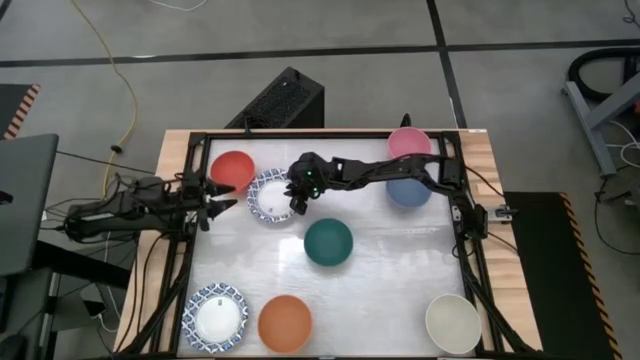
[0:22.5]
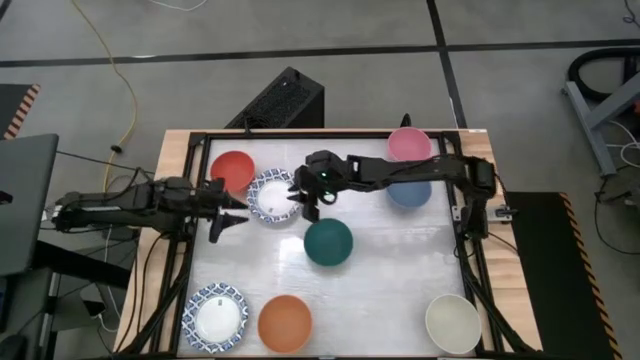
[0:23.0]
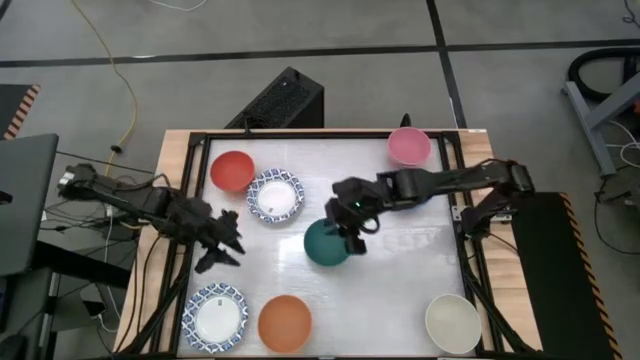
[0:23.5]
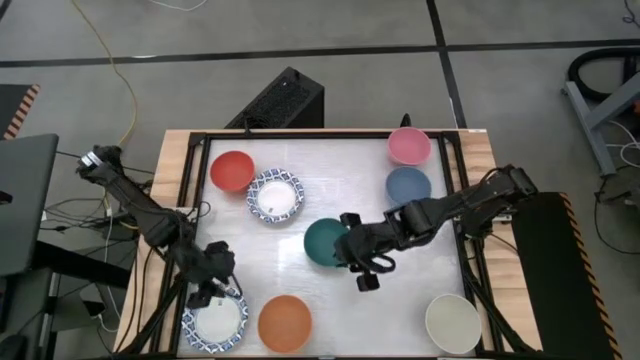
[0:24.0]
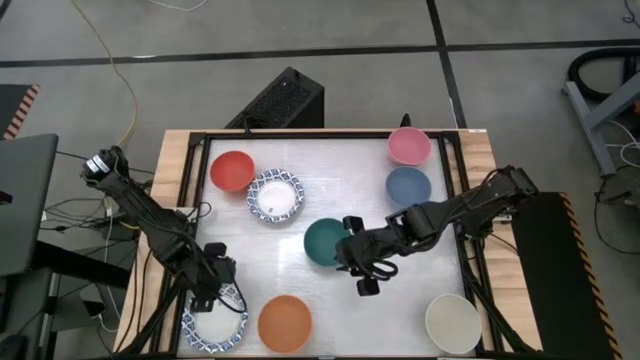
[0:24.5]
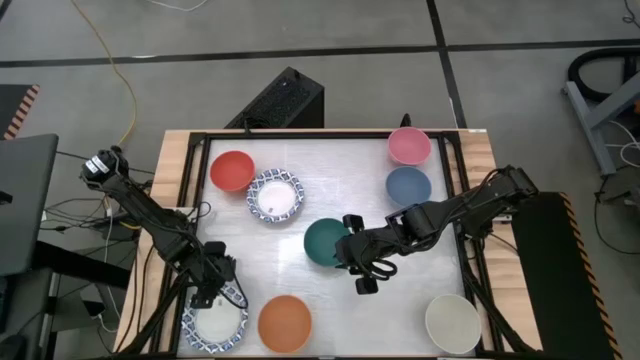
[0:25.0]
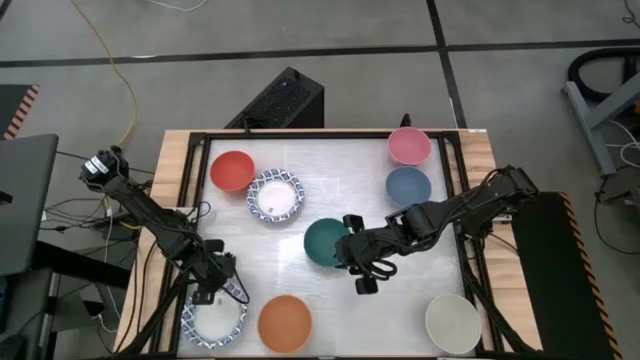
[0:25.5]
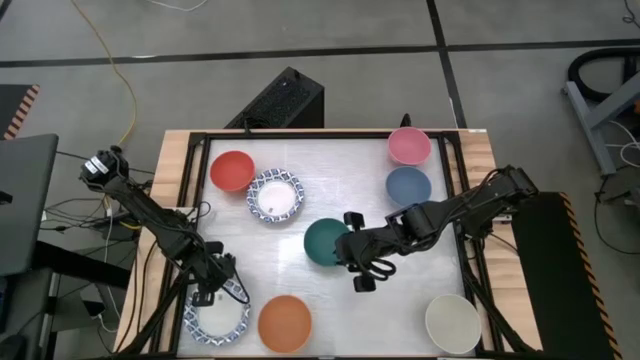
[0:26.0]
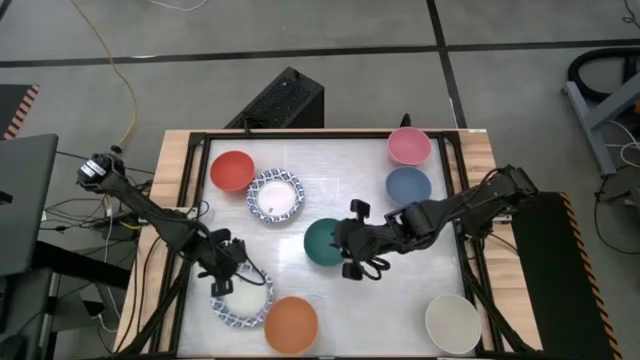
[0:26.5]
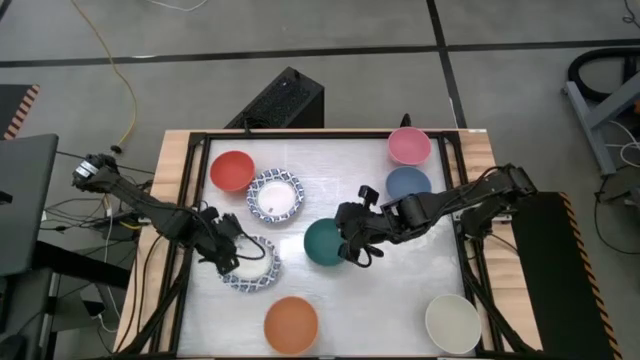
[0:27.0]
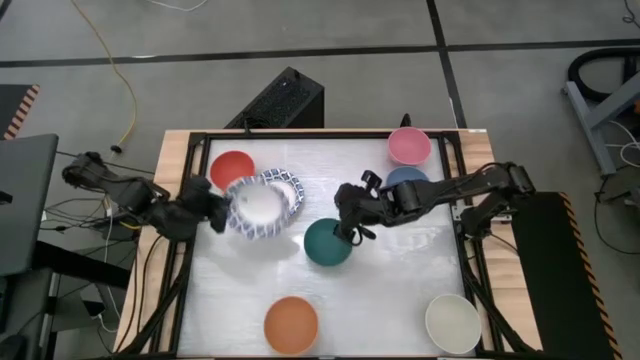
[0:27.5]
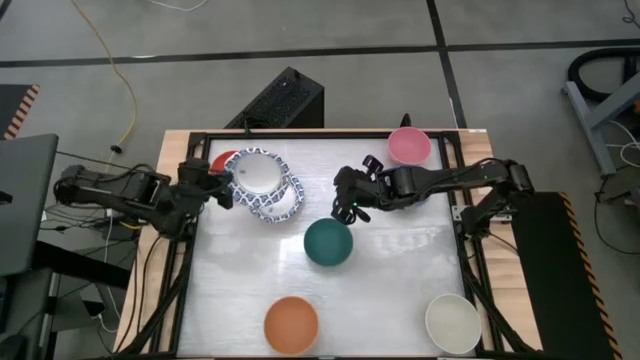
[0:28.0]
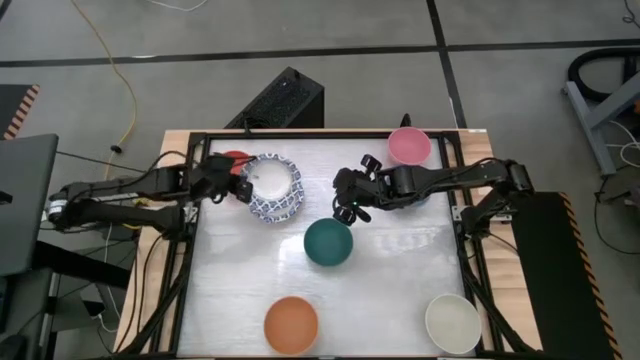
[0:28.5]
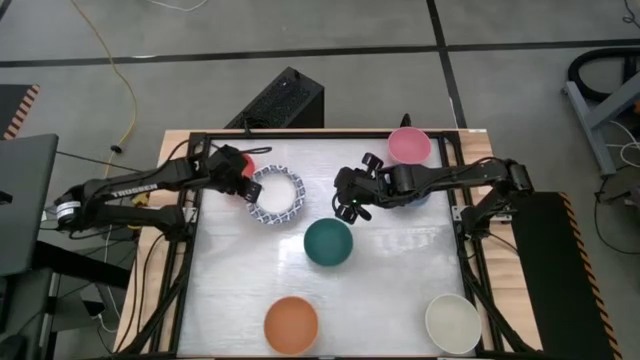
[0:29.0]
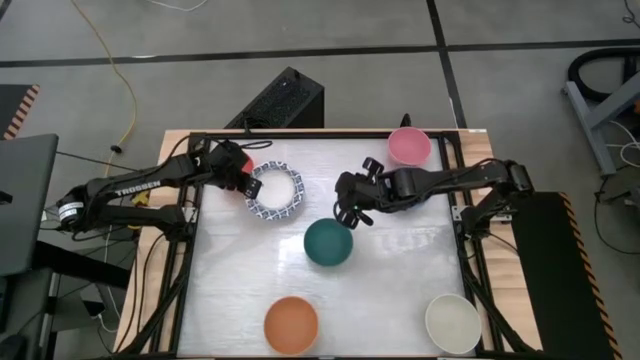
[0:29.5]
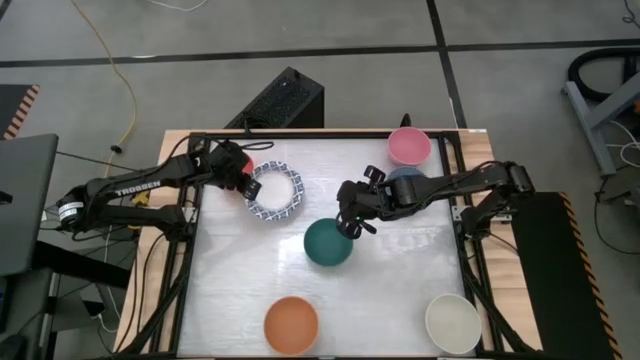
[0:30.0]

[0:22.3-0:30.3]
Stack the bottom blue patterned bowl on top of the other white bowl

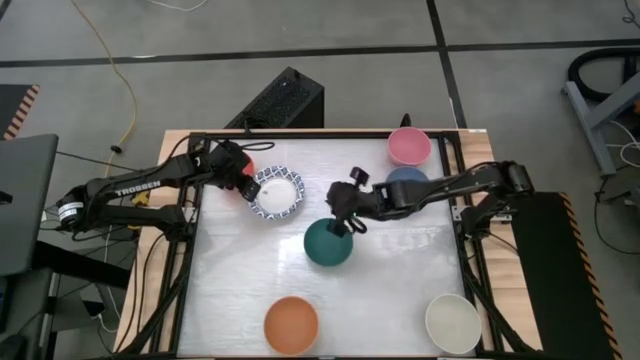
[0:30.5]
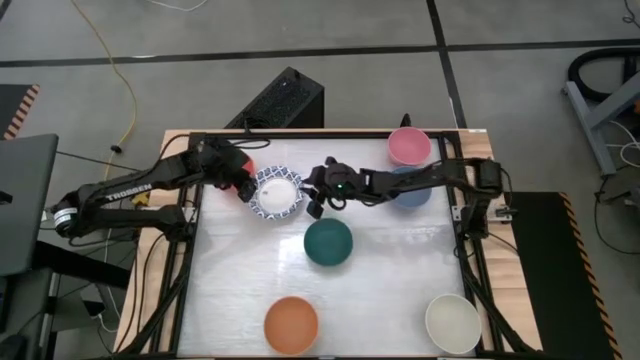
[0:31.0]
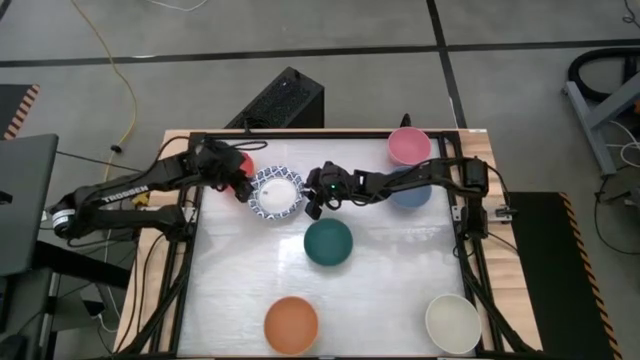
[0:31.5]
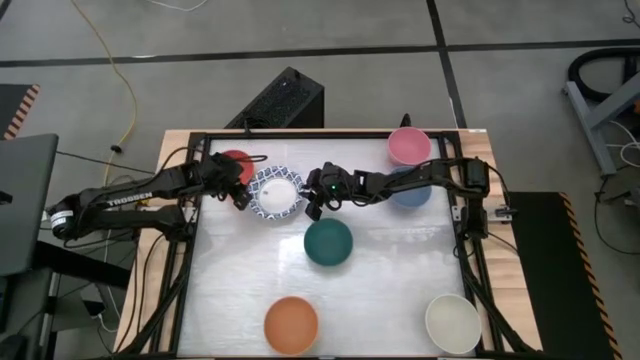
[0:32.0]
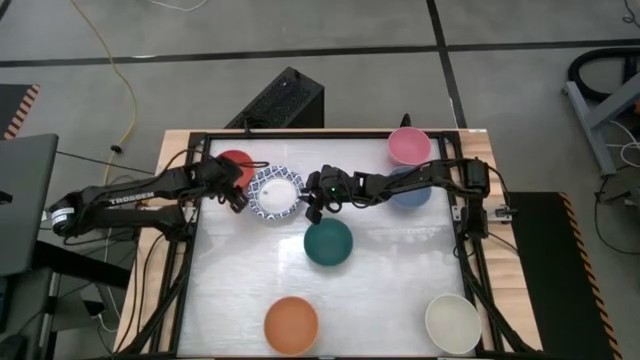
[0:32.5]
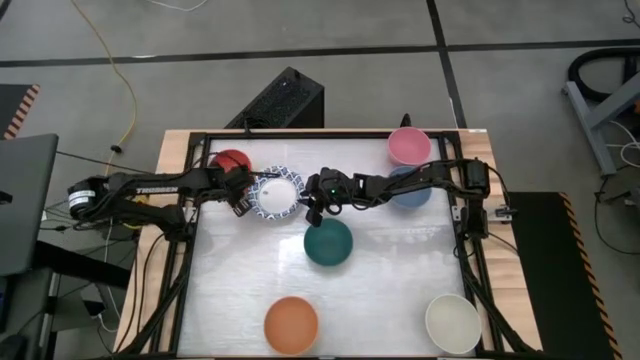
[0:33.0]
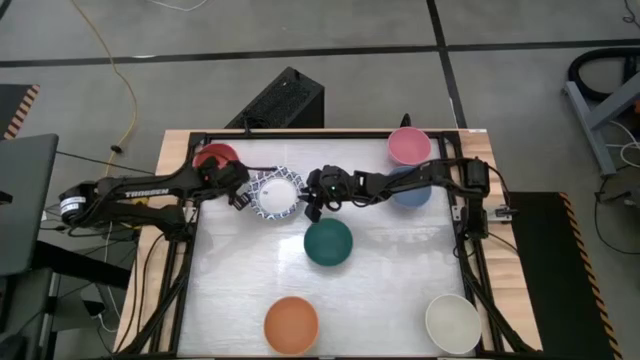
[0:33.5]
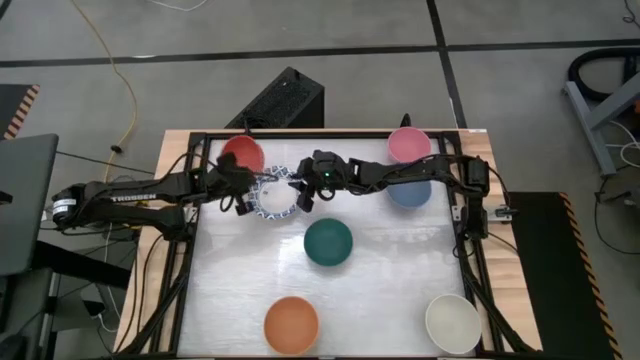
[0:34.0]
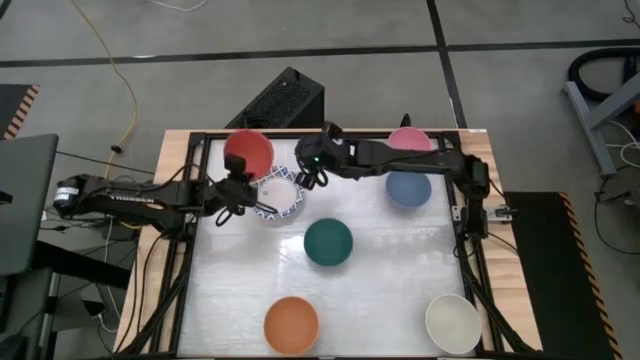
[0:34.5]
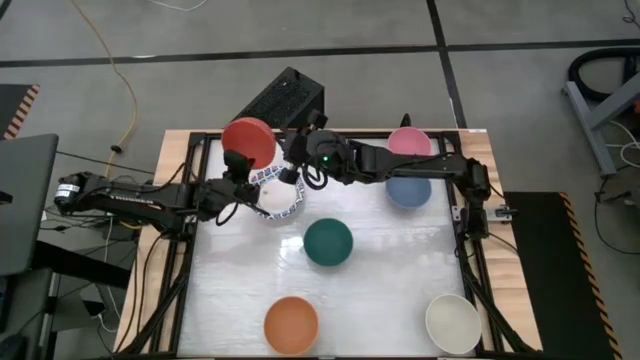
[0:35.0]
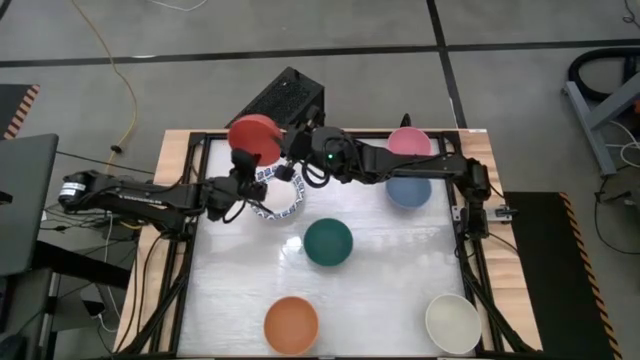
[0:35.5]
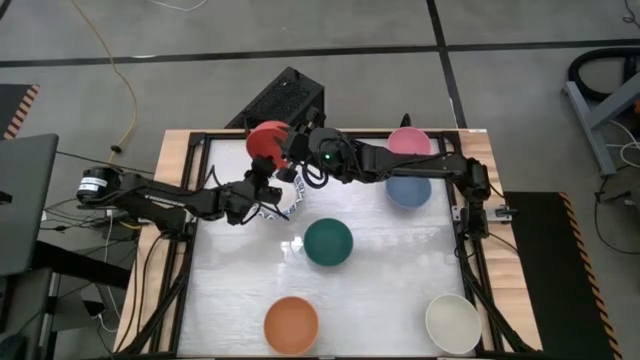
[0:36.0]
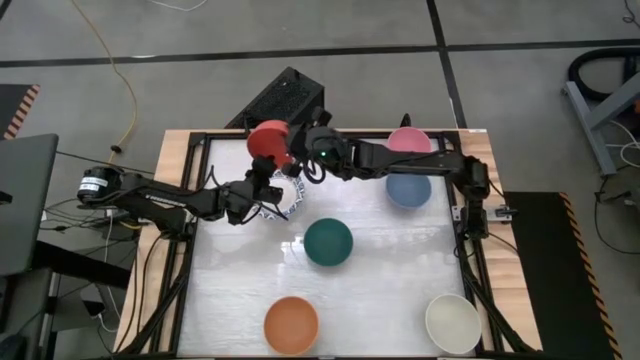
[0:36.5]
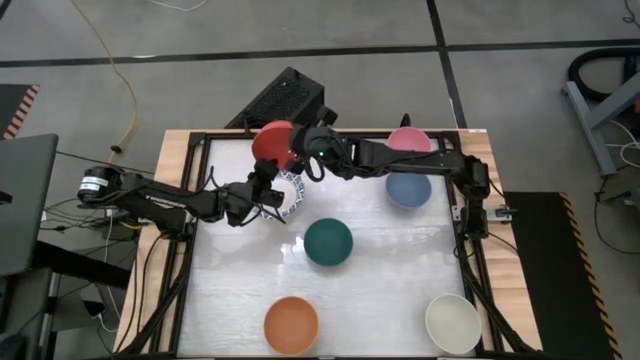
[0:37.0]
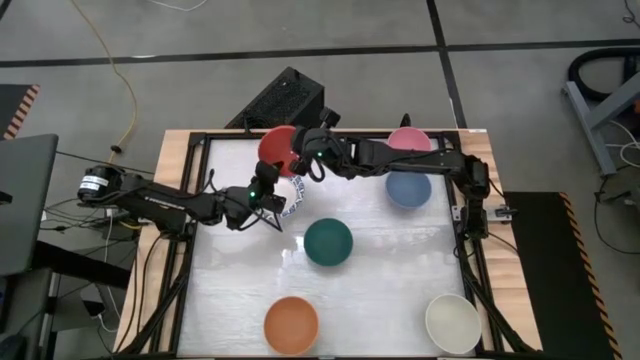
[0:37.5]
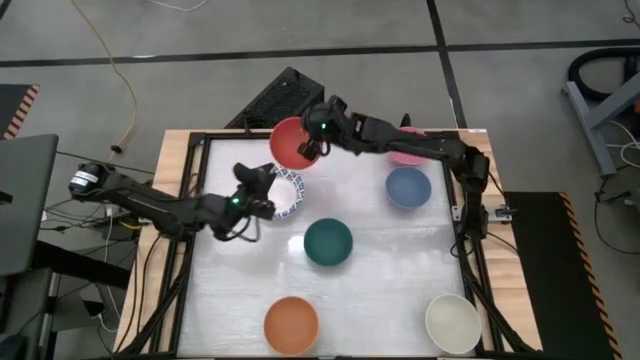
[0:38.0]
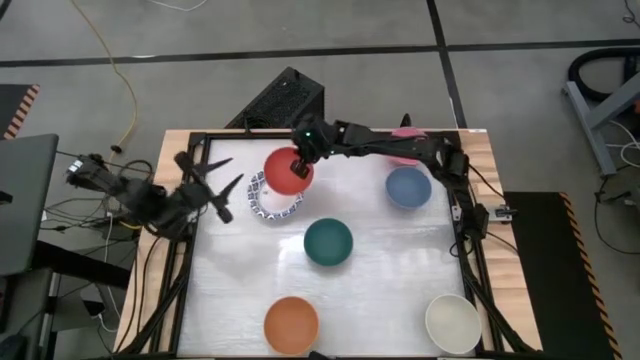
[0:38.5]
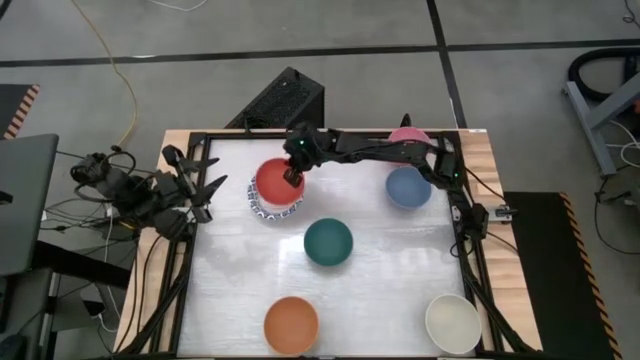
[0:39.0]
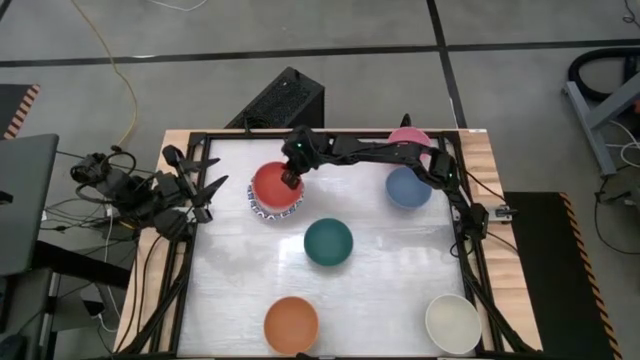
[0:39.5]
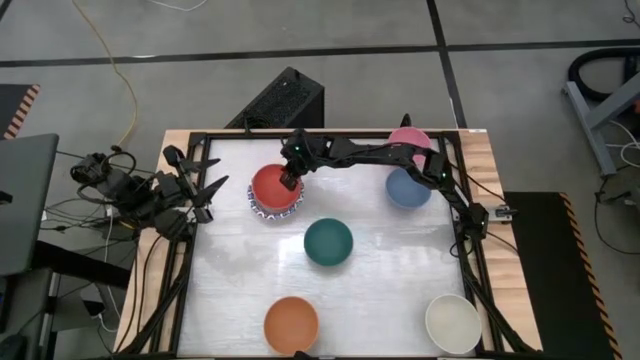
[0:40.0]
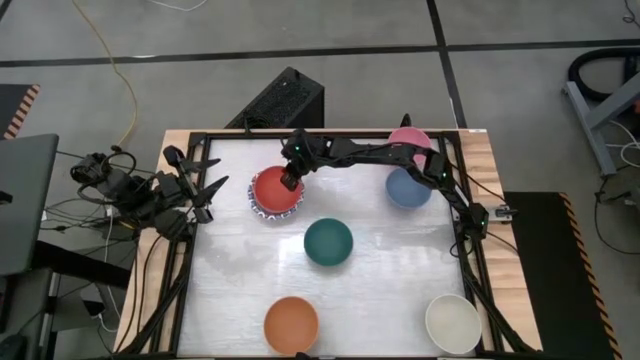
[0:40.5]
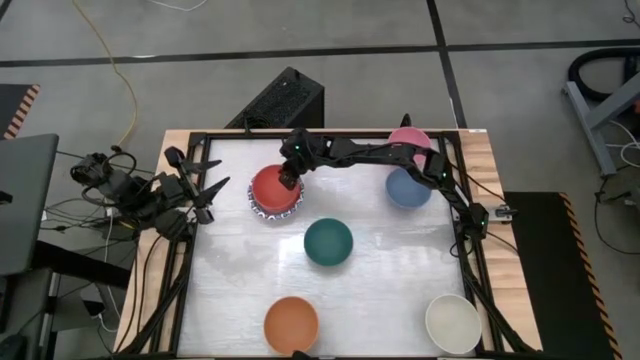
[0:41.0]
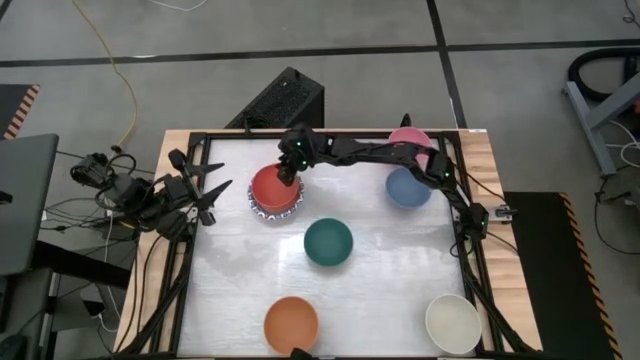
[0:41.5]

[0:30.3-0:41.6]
Stack the orange bowl on top of the blue patterned bowl
